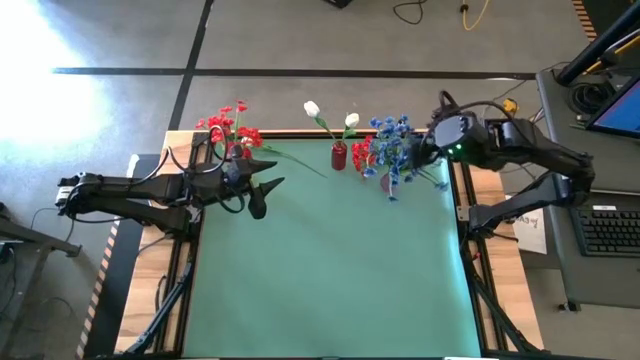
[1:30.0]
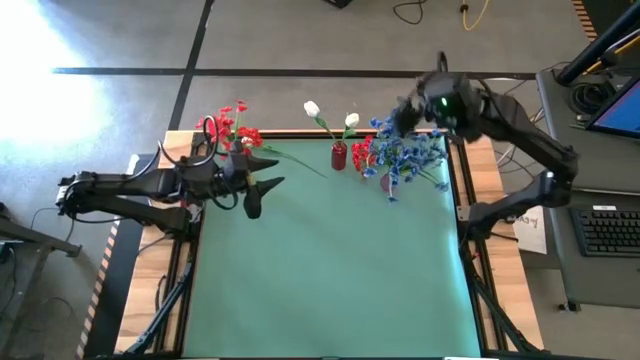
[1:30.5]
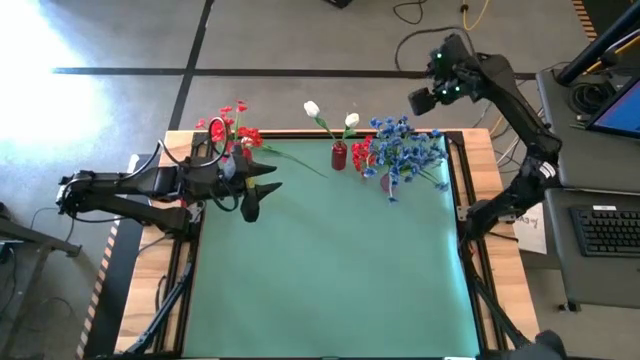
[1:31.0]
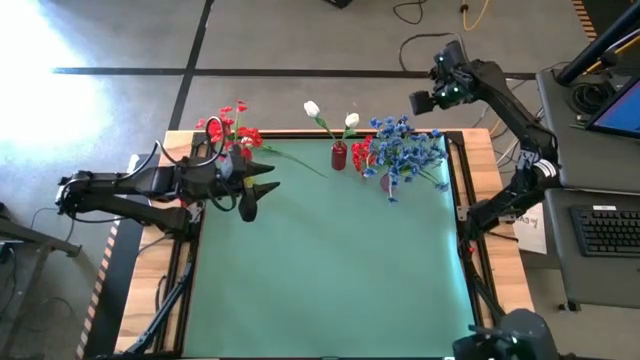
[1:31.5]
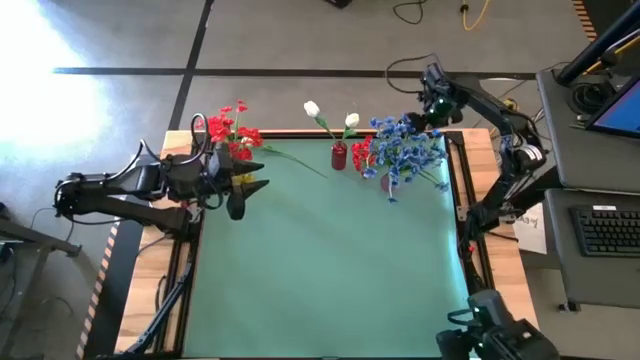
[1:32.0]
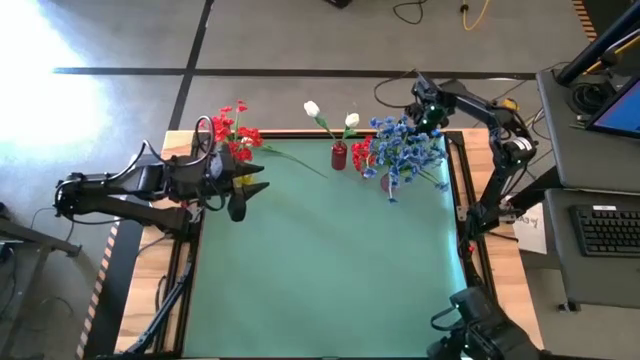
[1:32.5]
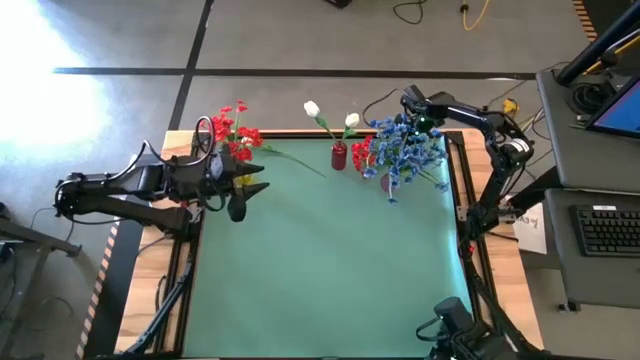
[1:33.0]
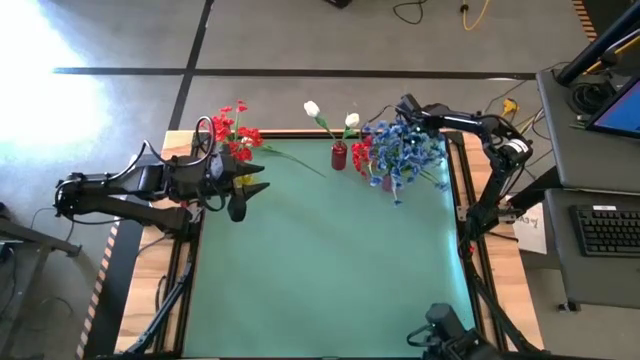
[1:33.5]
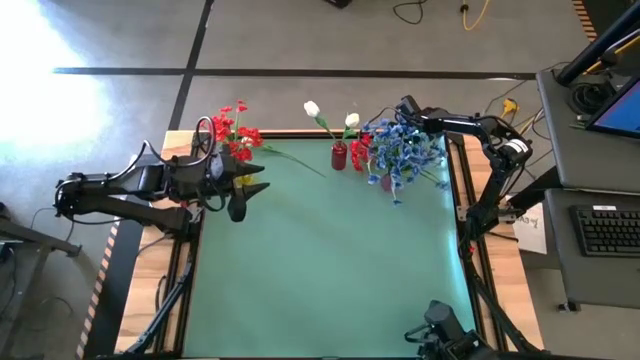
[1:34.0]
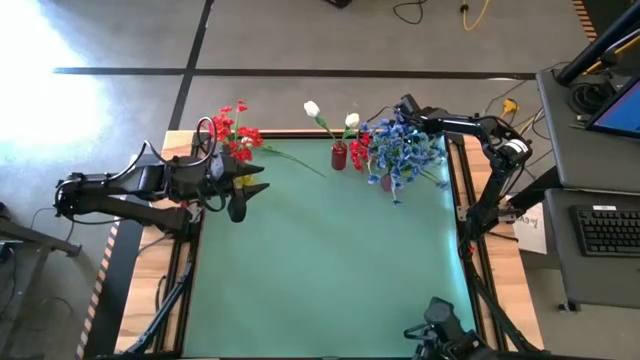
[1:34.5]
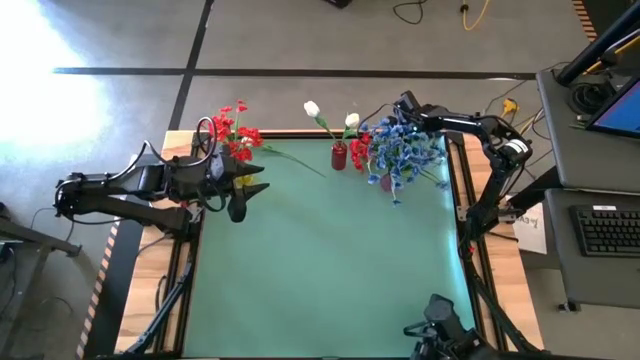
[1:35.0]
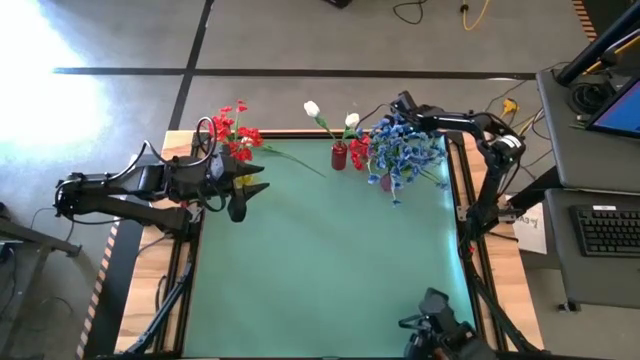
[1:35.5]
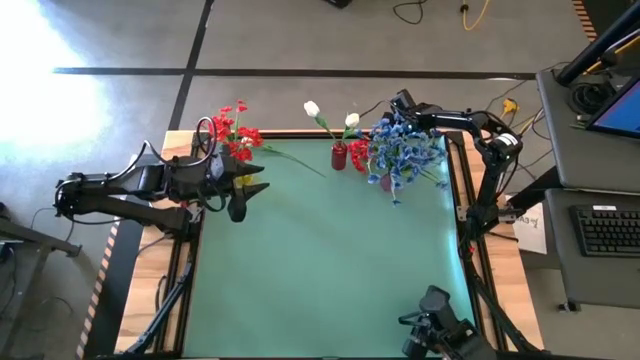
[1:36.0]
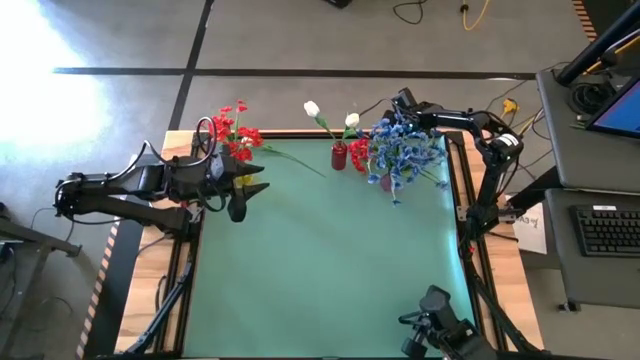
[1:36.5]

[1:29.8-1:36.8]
Task: Sort flowers into vase by color
Put the red flower into the yellow vase
